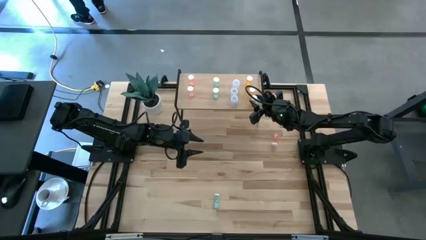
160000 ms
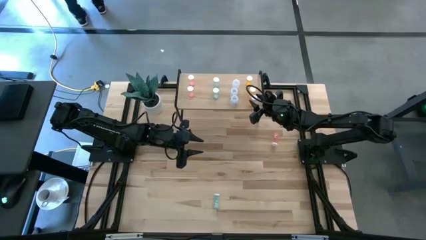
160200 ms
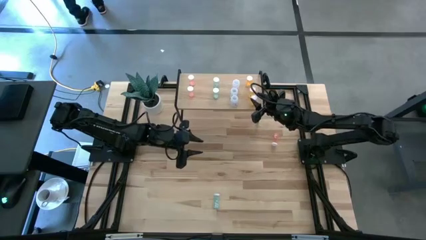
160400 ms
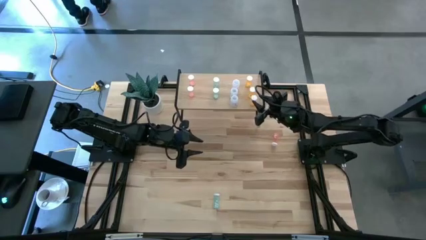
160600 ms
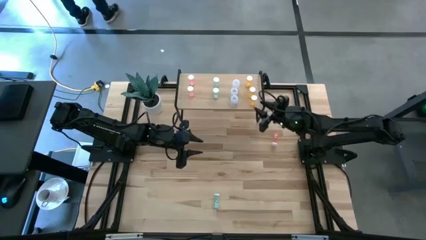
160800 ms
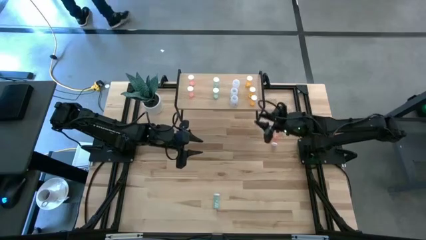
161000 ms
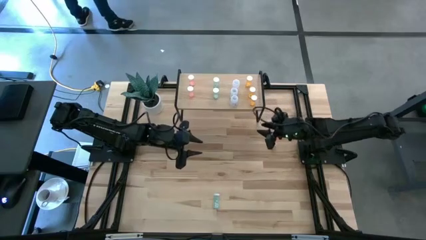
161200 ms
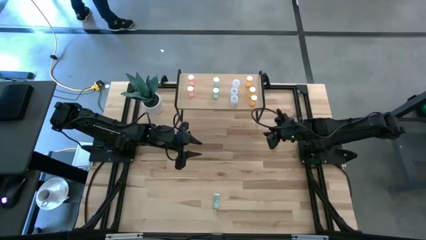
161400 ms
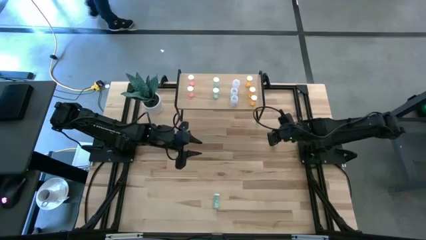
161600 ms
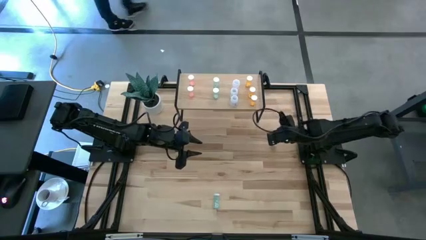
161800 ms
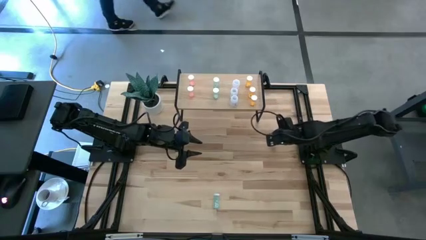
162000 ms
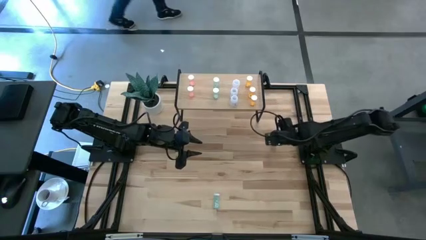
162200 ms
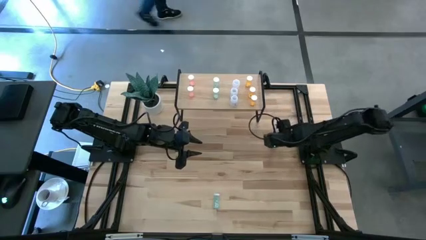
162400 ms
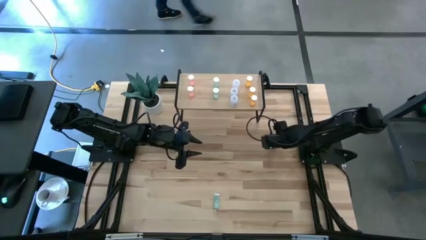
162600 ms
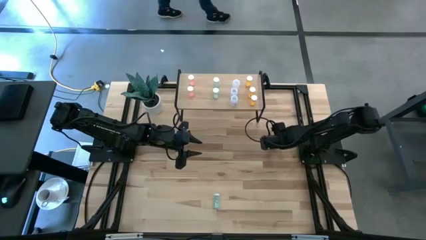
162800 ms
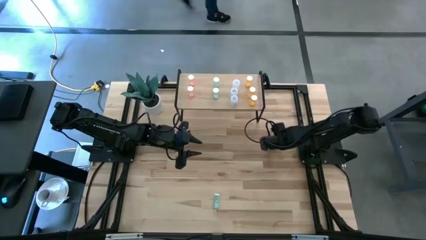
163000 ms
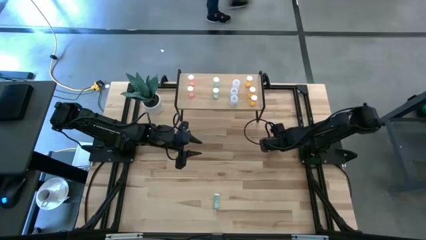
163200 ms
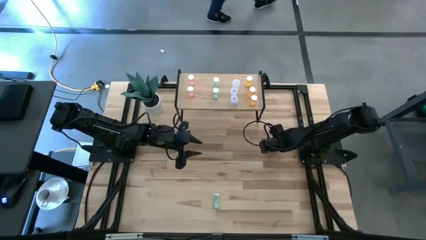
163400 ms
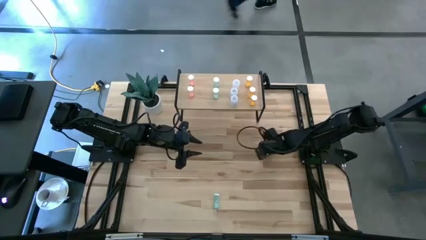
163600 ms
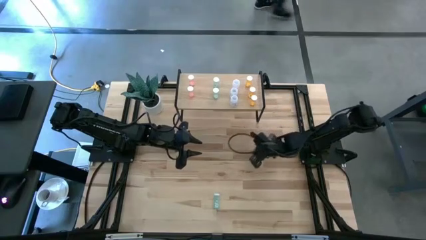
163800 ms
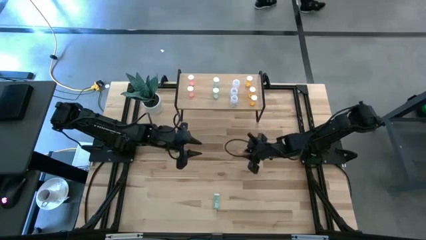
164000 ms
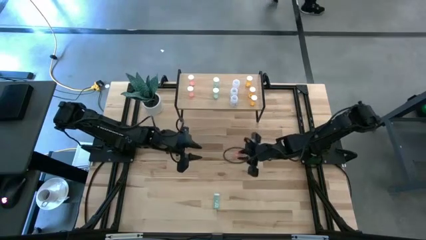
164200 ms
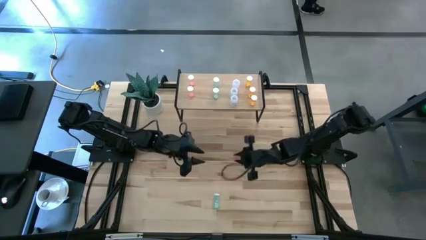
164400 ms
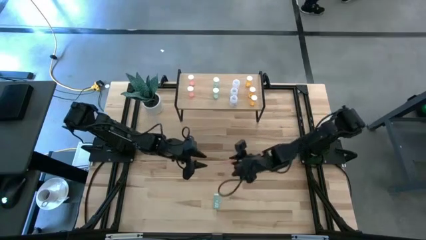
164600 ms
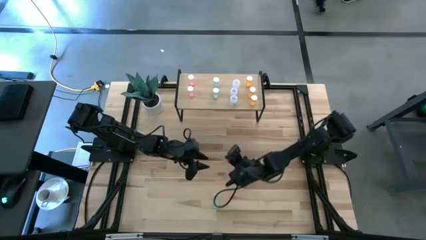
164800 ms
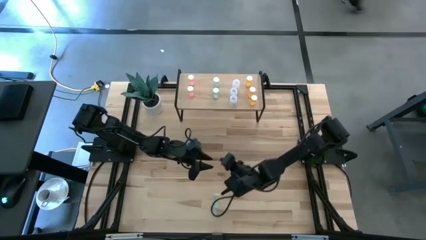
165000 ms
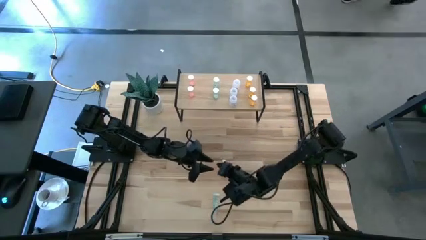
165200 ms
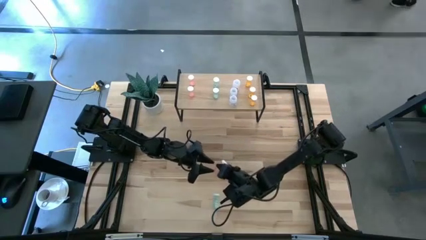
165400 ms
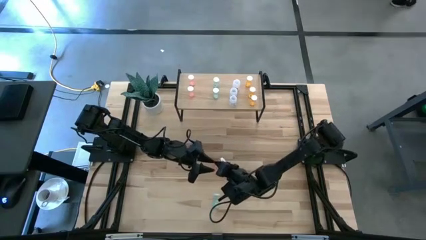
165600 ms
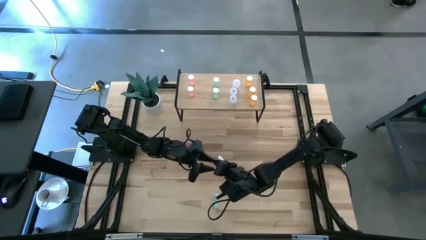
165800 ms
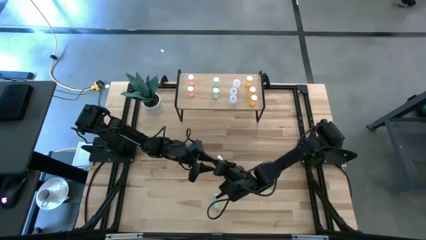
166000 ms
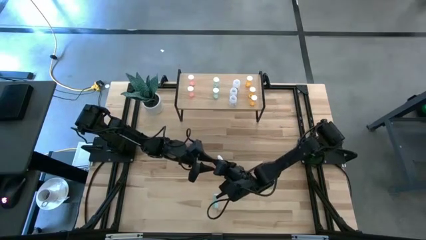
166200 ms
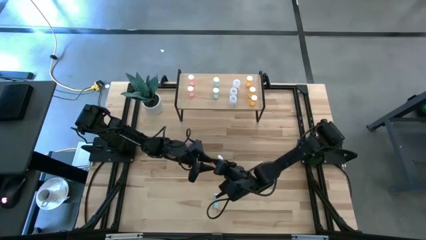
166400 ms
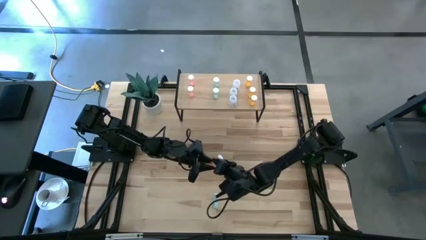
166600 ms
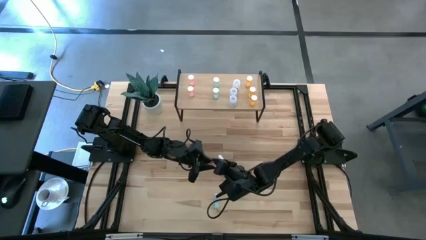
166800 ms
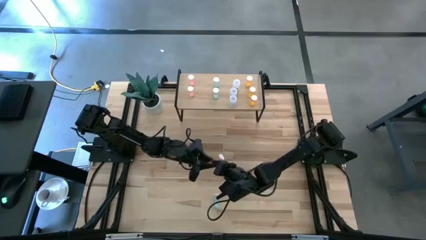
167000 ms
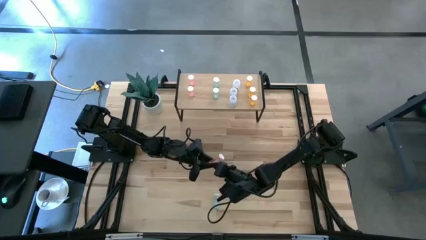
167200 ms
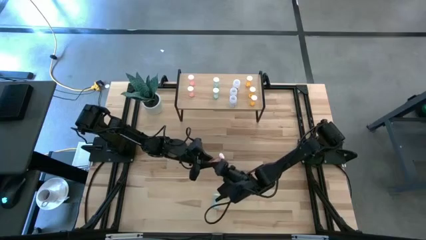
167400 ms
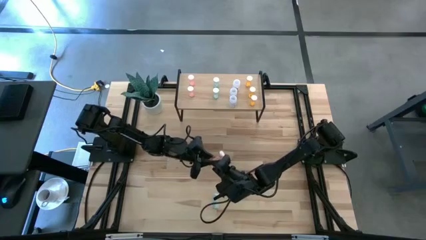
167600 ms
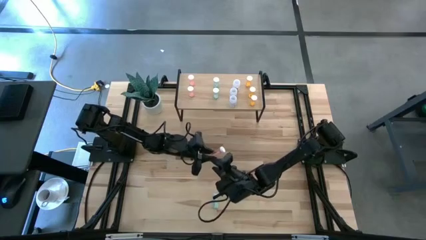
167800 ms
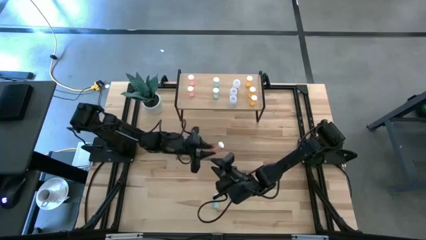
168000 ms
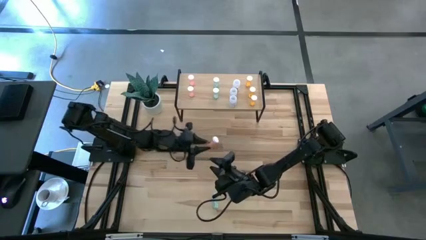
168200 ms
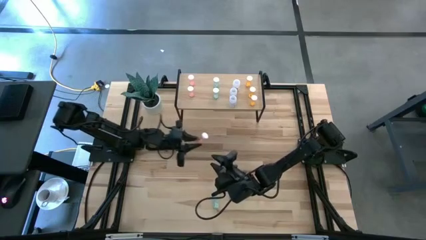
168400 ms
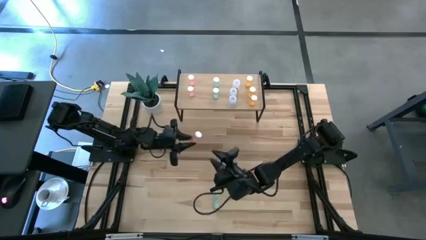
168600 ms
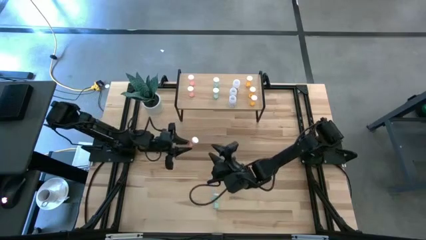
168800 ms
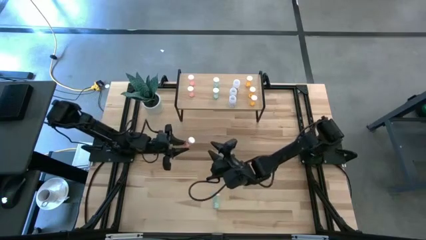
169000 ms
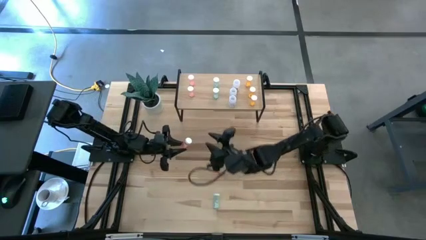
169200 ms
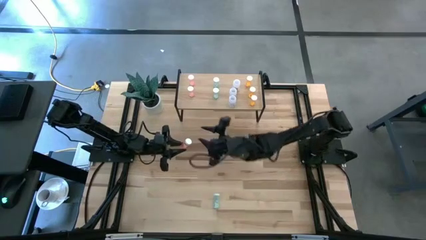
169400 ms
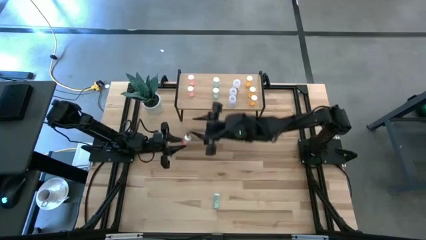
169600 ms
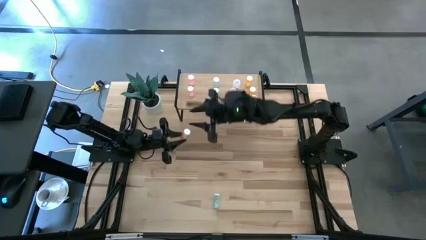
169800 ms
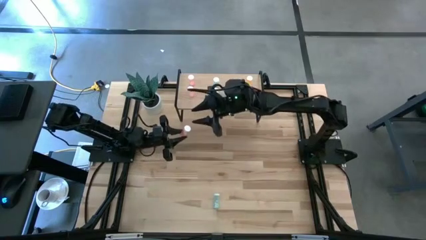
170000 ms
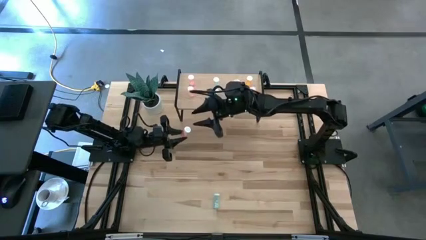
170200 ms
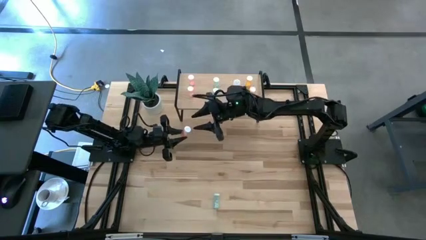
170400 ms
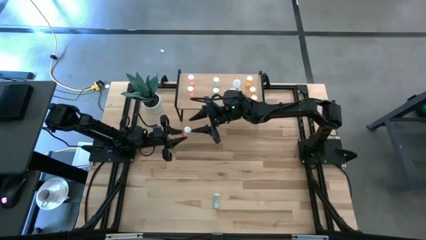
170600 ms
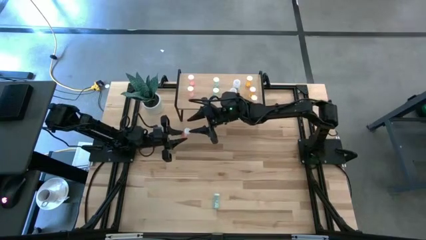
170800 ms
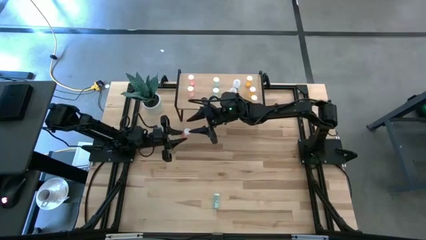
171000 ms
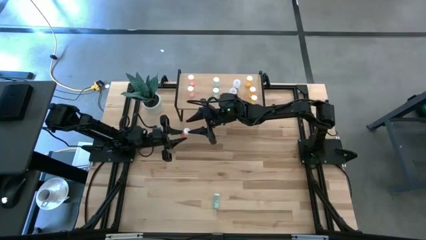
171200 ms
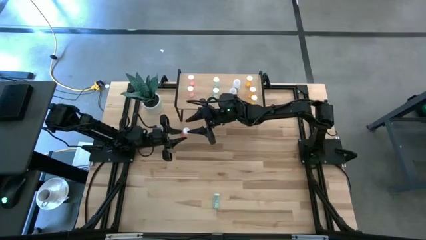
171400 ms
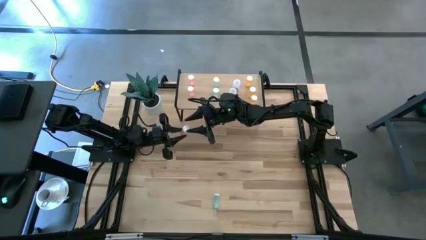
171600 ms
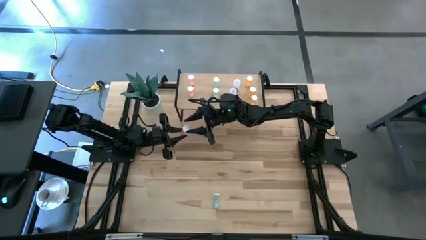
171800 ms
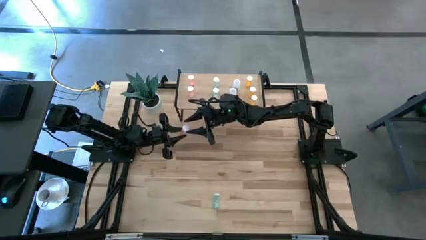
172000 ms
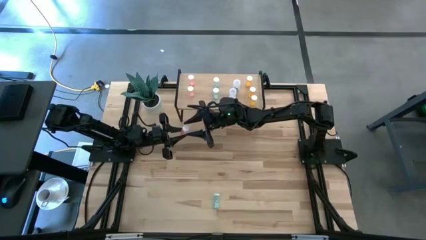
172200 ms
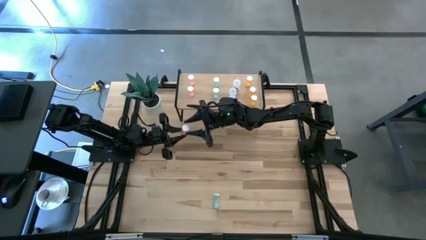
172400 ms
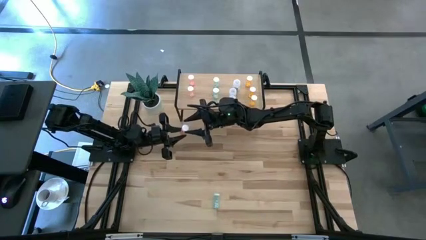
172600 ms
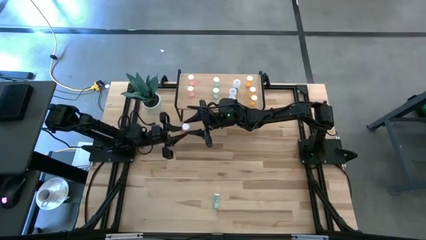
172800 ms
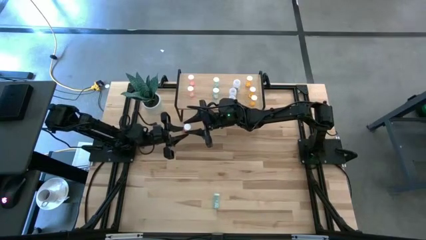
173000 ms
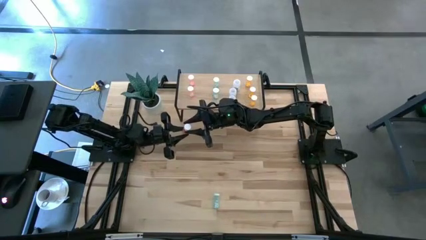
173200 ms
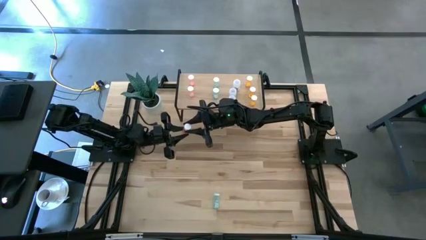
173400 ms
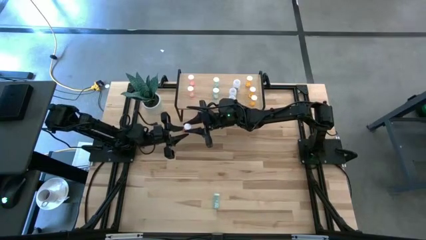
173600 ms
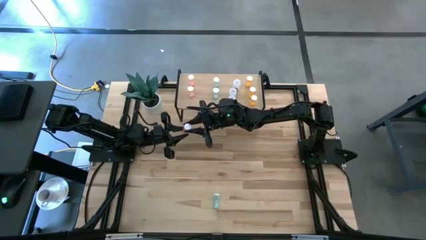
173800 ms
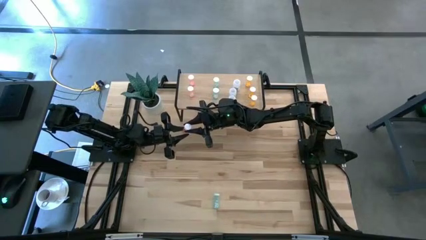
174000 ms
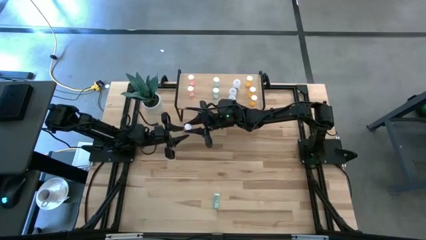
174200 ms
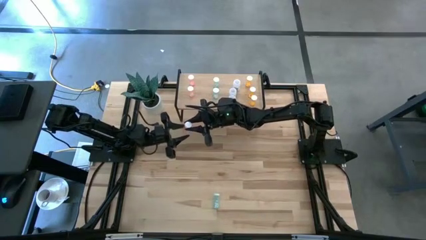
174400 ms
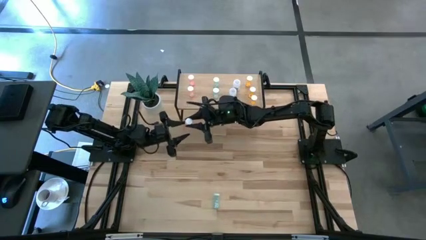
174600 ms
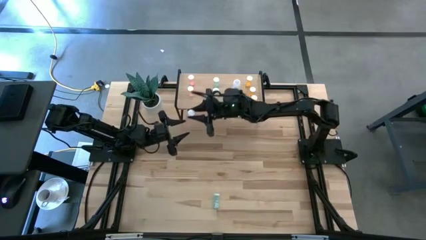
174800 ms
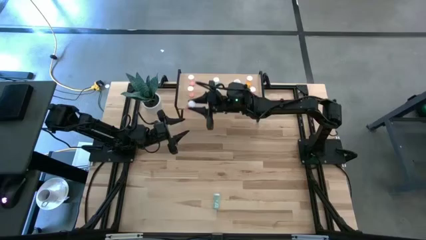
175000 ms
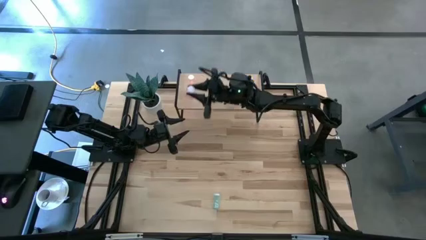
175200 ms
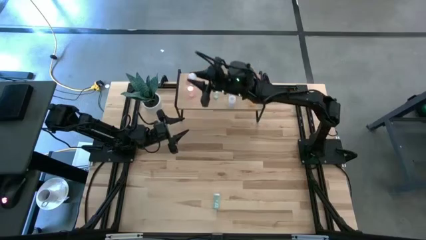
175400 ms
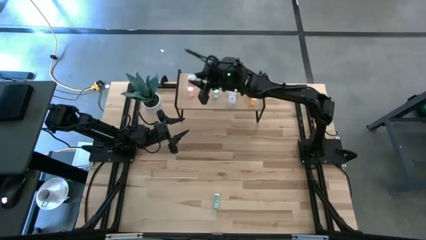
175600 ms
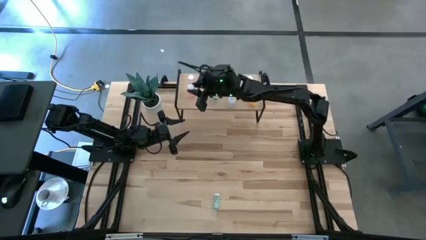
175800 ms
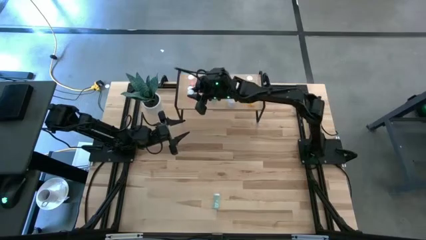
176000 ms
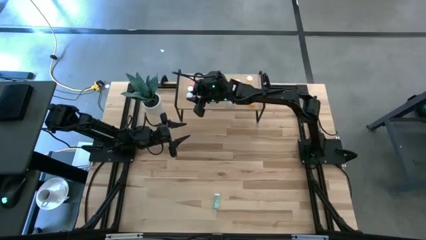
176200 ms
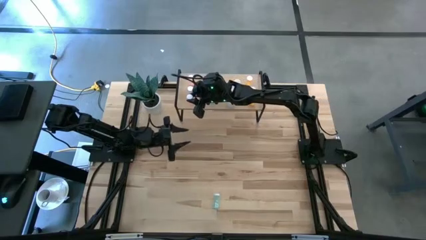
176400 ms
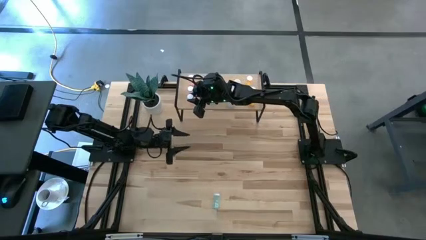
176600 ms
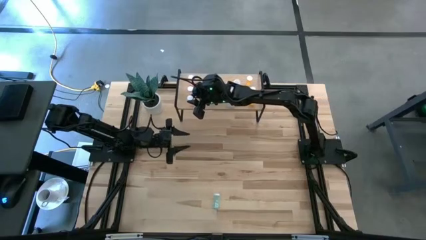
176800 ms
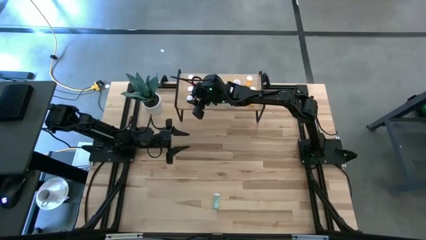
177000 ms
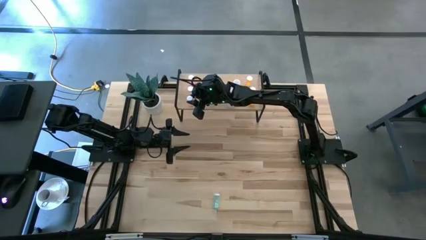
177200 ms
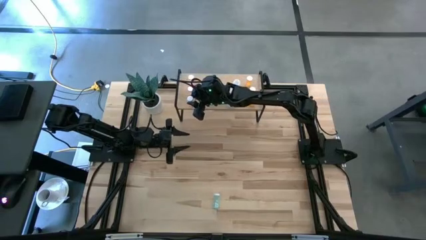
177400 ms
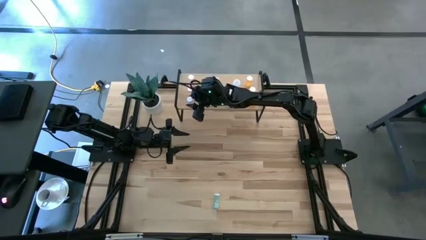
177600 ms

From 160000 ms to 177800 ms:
Task: Pick and place medicine bottles onto shelf by color
Put the pink pill bottle aligned with the other pink pill bottles on the shelf
